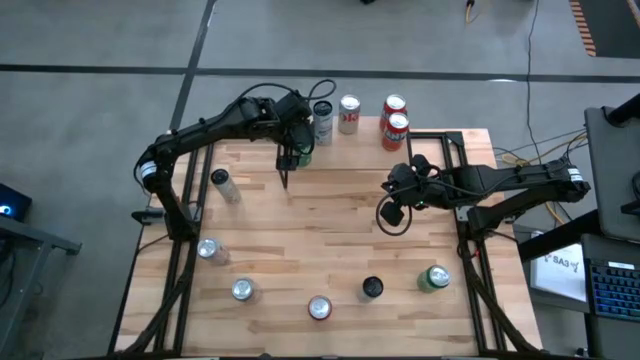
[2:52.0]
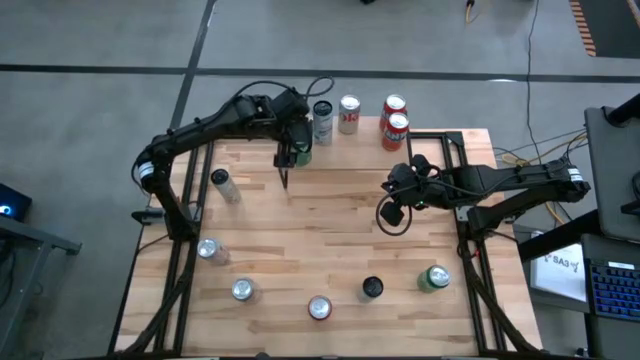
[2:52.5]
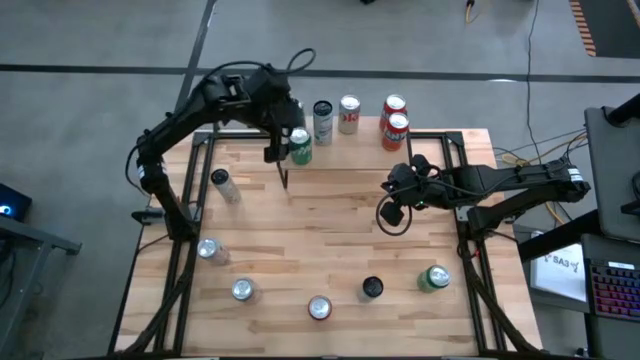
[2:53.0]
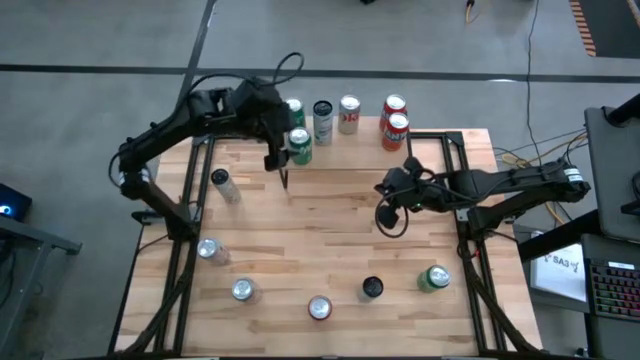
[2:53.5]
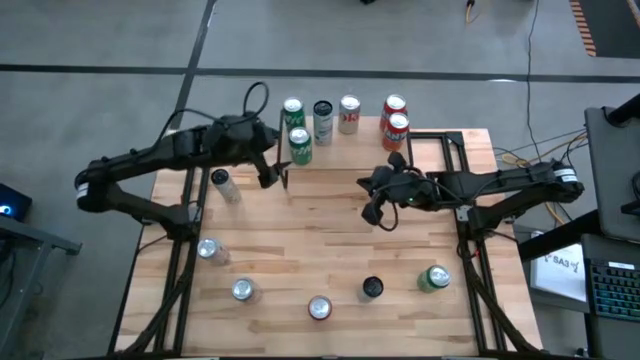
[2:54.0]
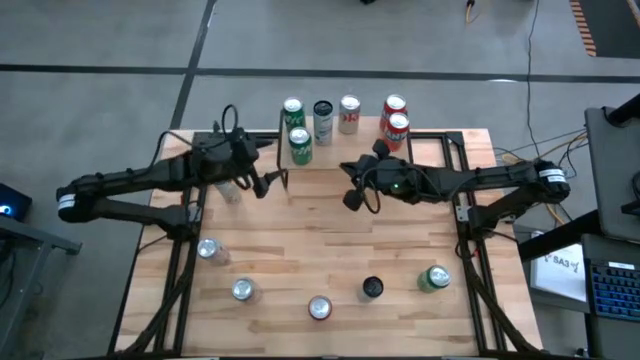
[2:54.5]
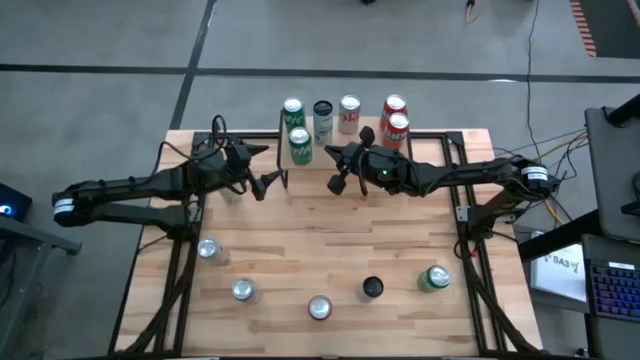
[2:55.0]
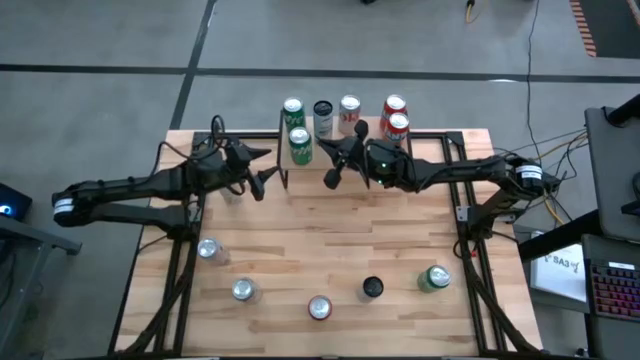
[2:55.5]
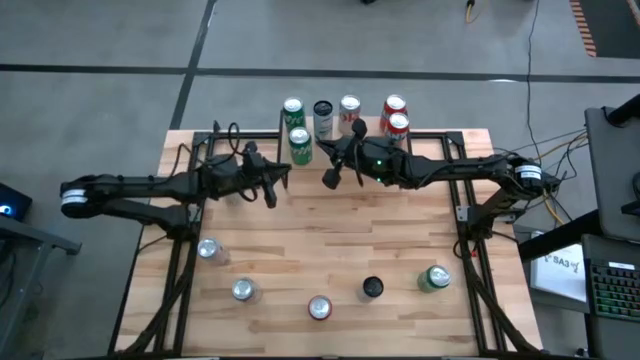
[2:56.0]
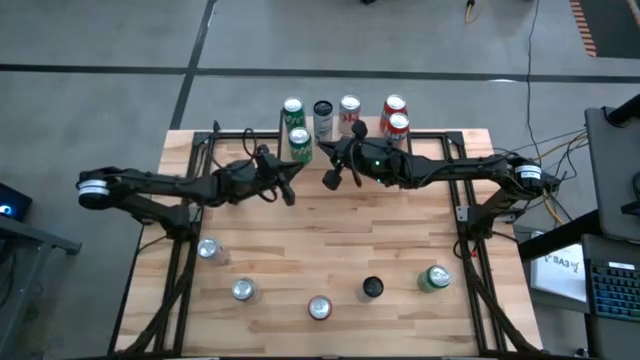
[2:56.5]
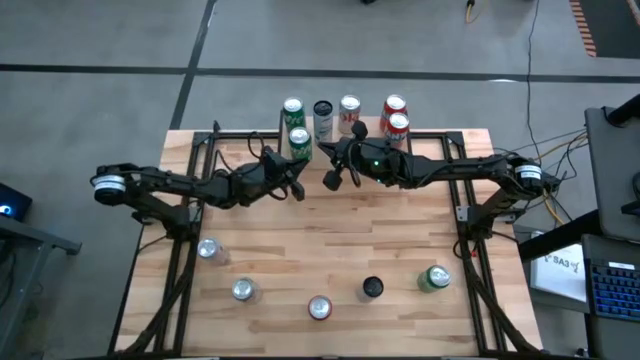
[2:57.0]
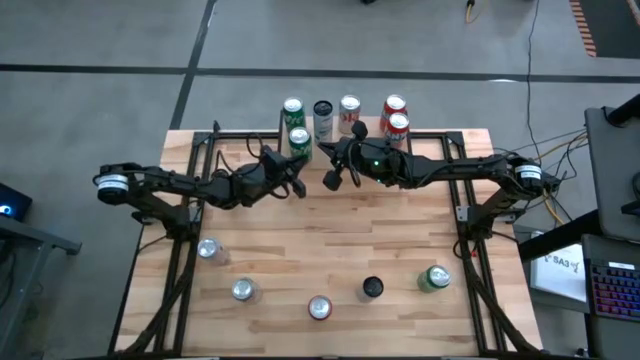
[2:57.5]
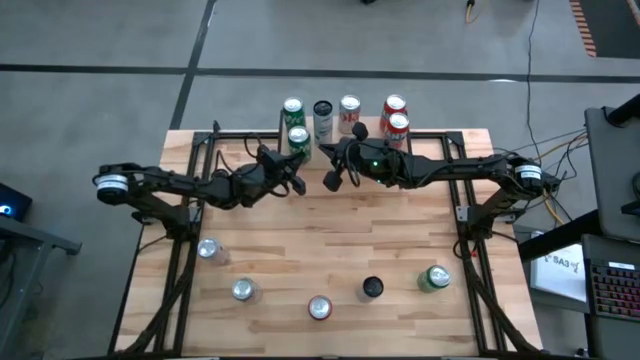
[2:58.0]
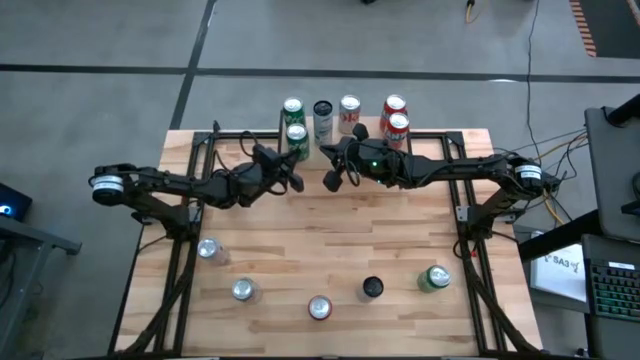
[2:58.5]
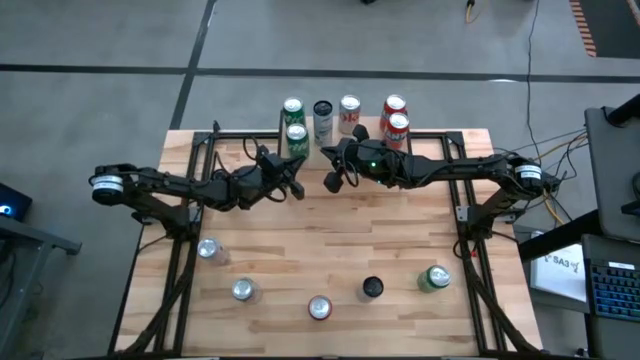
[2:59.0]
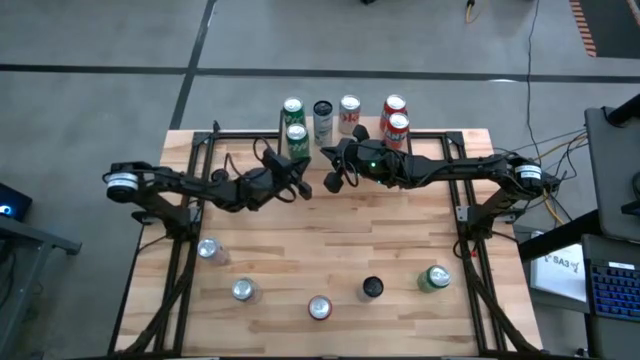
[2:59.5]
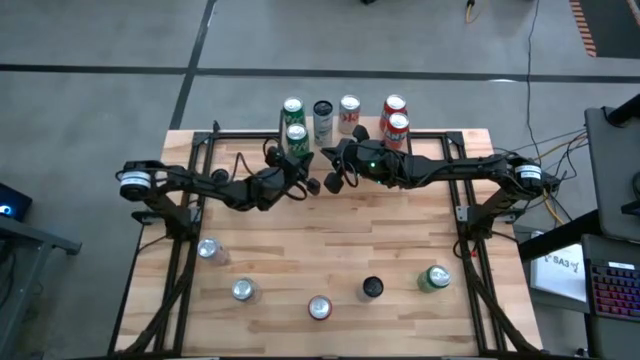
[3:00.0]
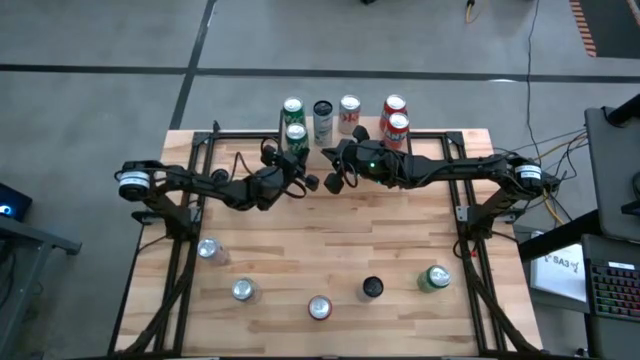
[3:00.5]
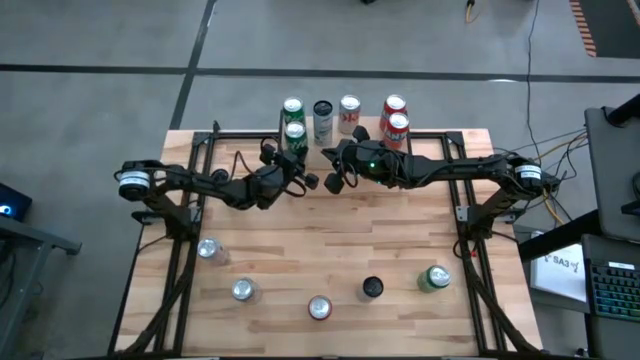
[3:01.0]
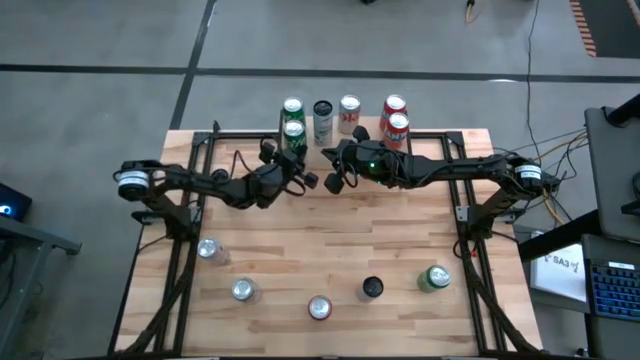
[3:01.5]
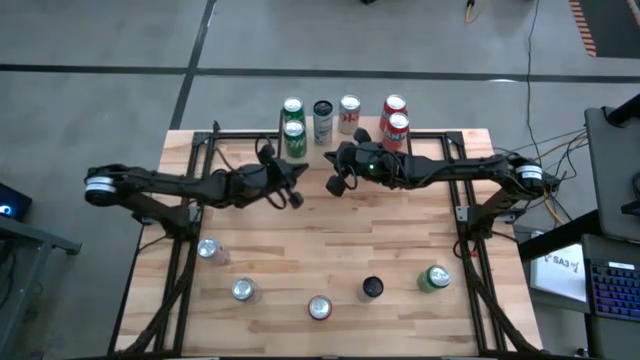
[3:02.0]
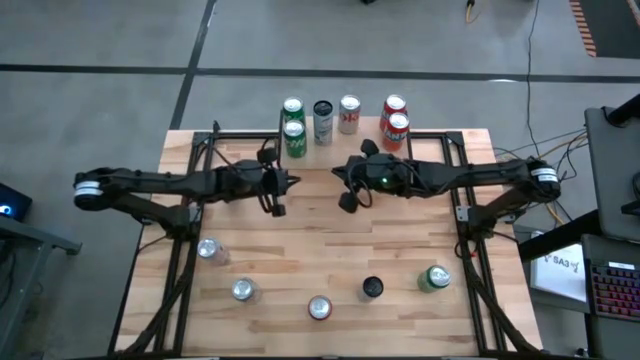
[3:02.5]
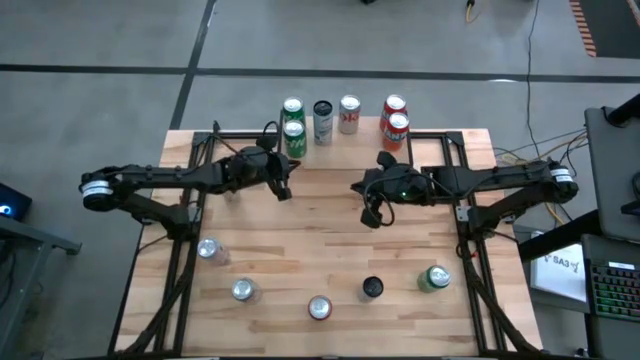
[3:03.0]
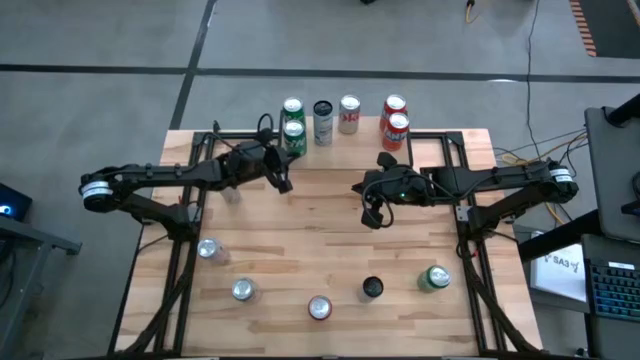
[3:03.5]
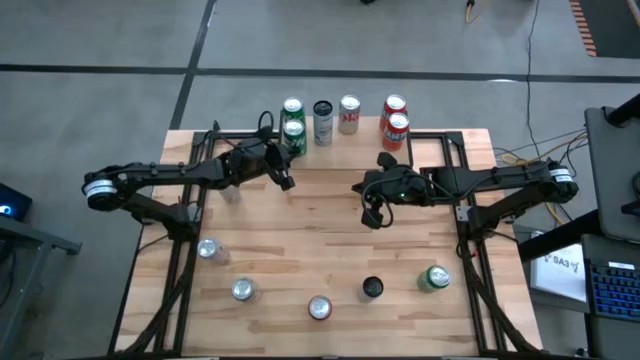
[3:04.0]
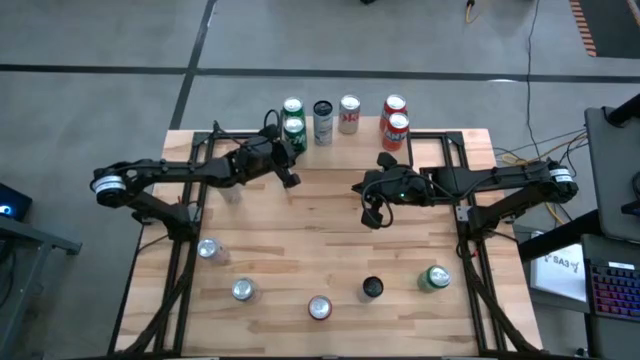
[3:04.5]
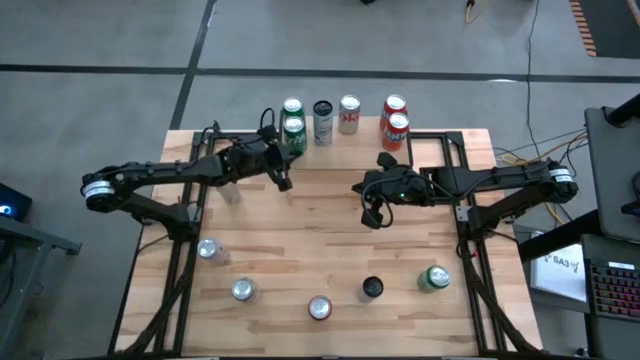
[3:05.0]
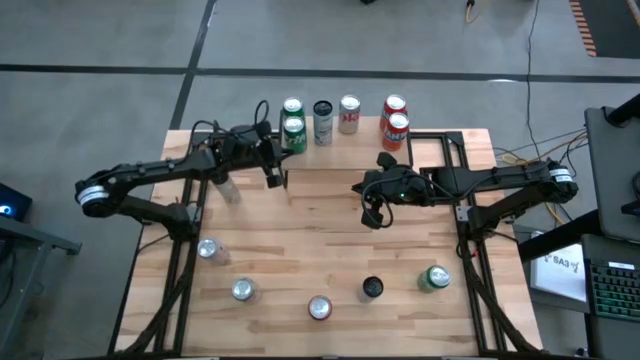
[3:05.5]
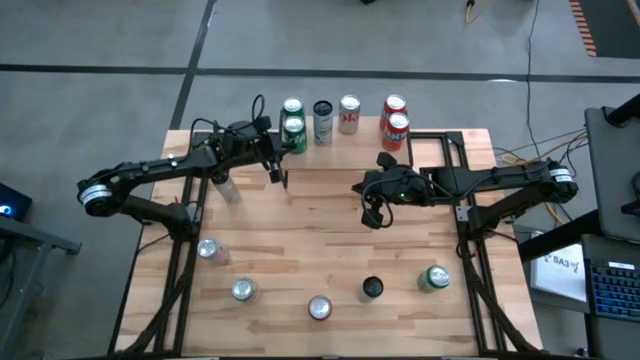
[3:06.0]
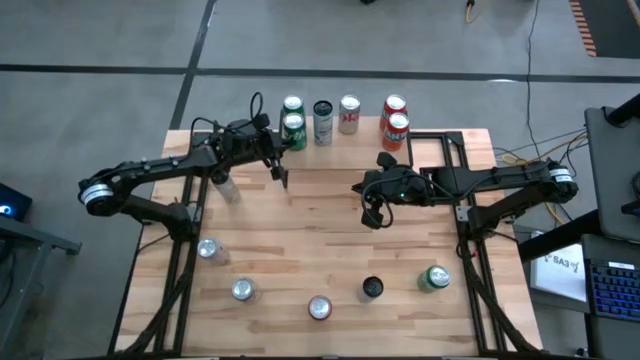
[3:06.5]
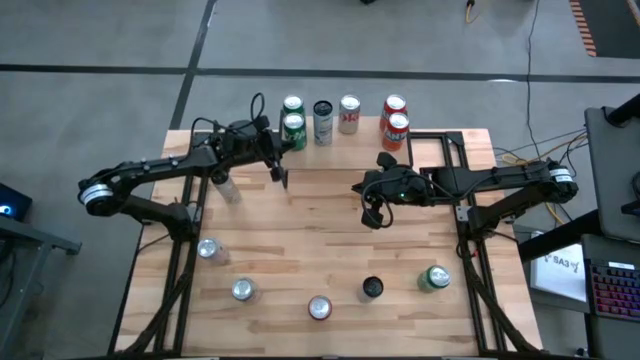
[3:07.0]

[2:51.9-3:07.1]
Task: Place canned beverage on shelf
Put the top green soda can on the shelf aligned with the other green soda can
